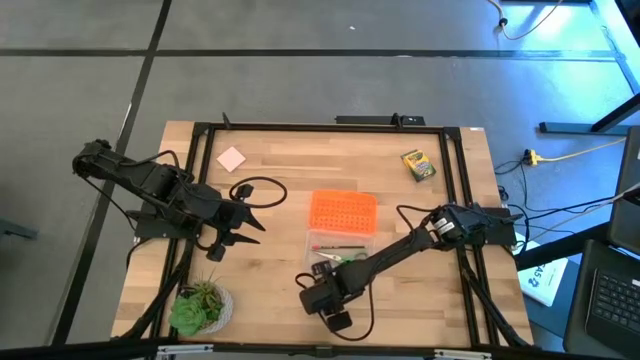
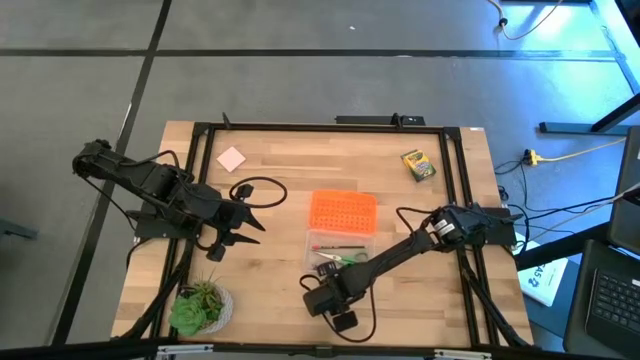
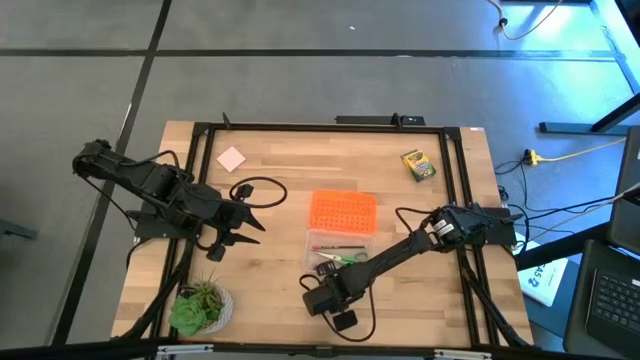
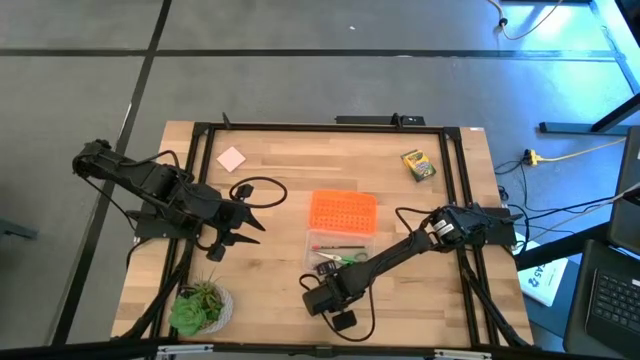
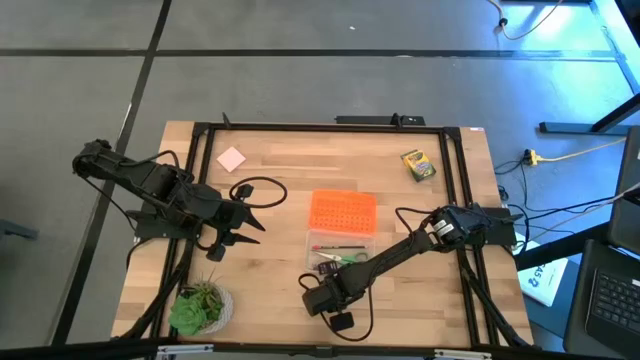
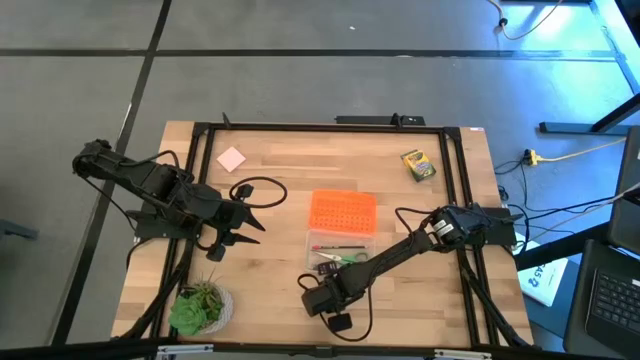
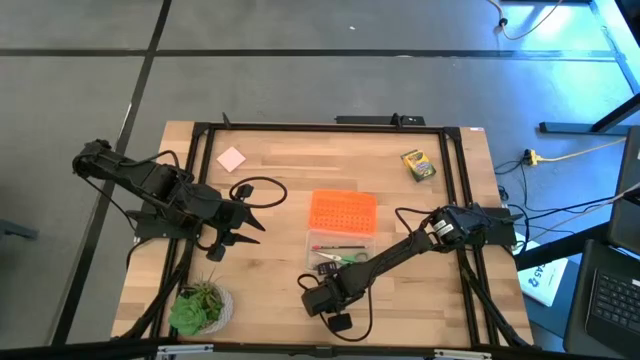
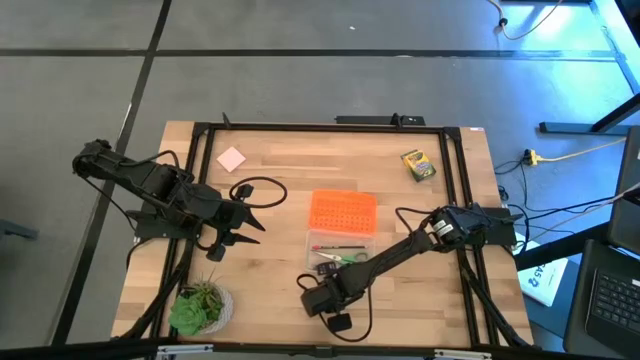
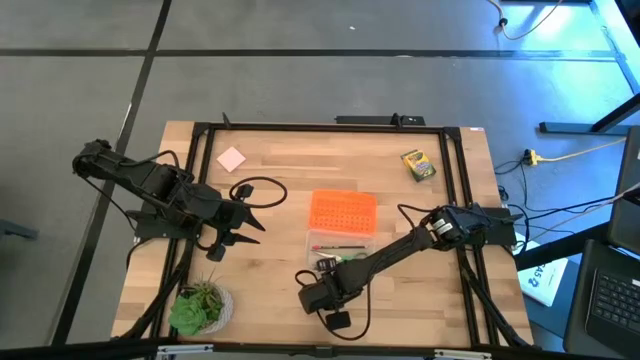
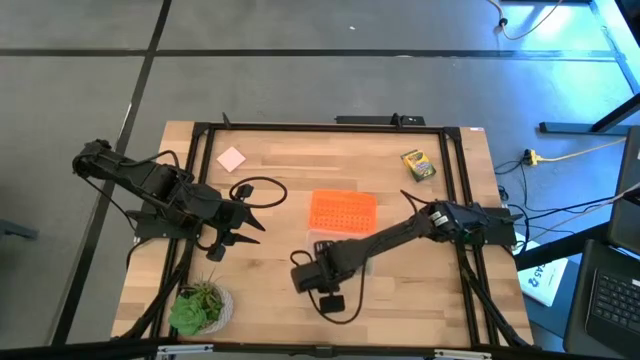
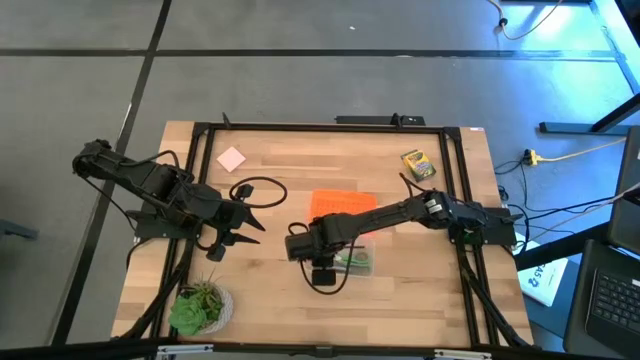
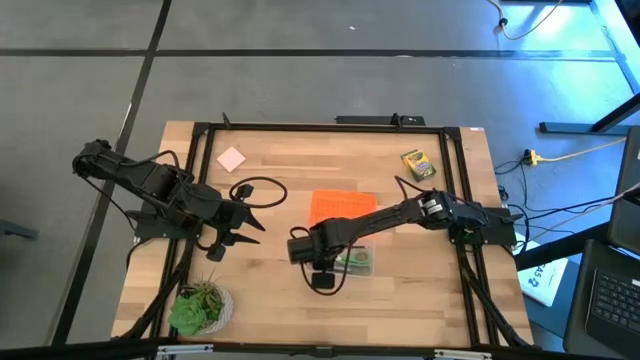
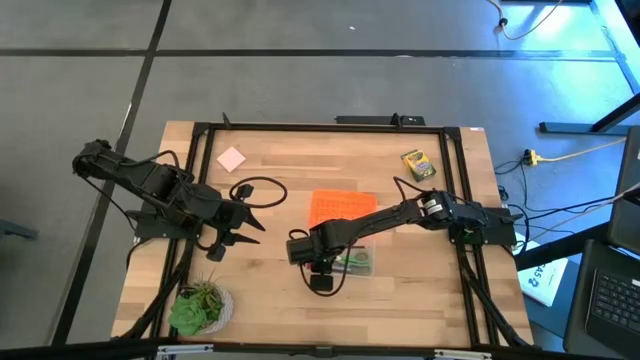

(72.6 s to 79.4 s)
Task: Pack school essentials
Put the red eraser into the orange supply box

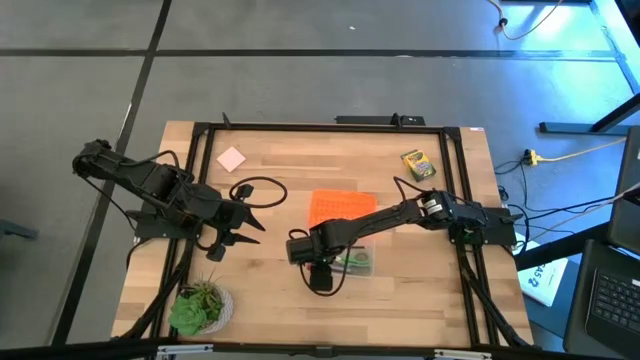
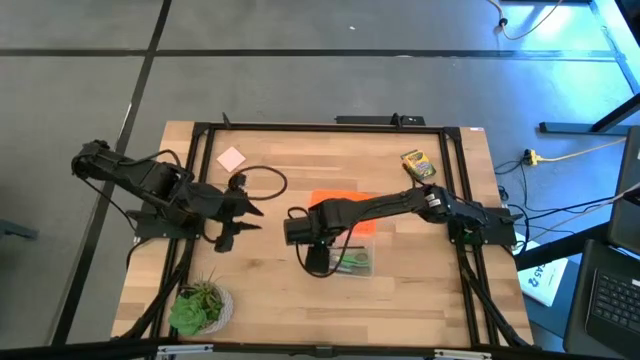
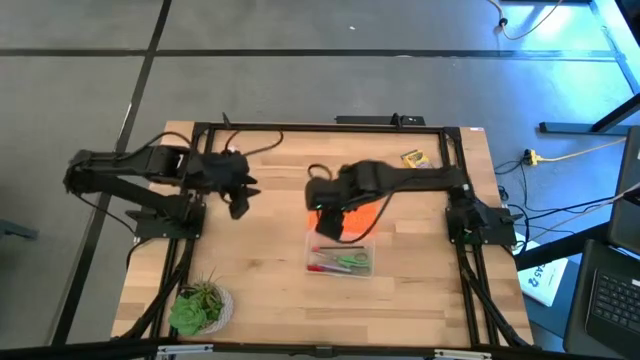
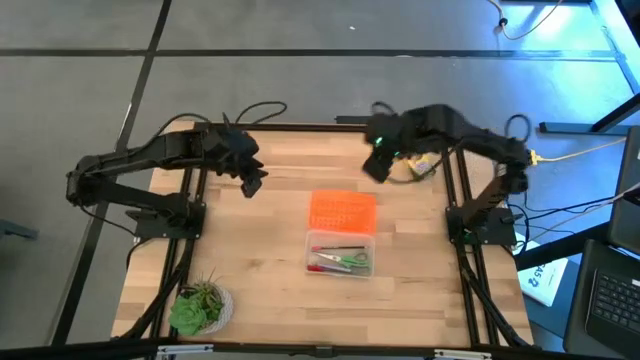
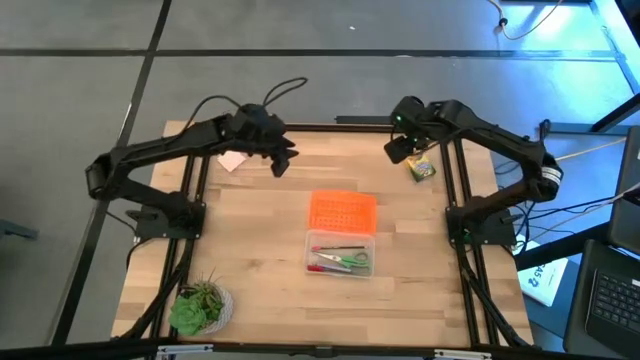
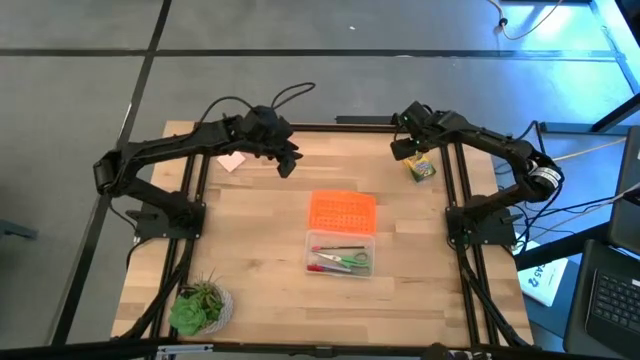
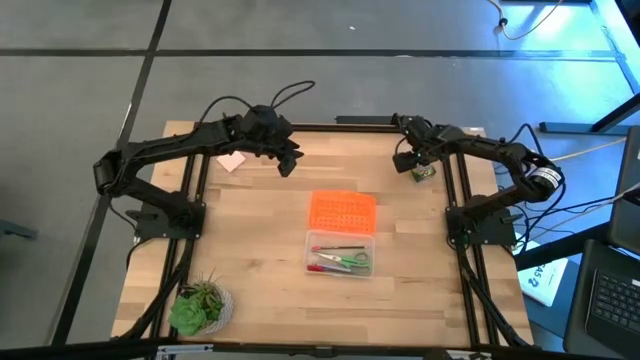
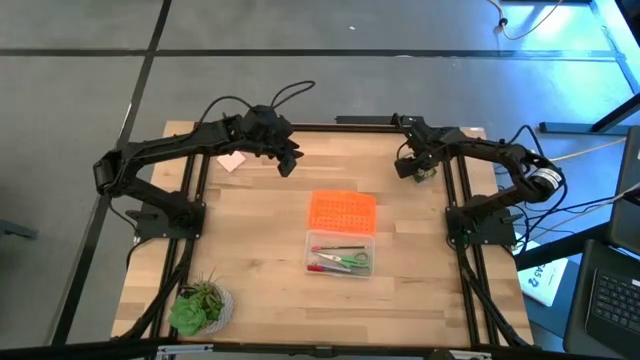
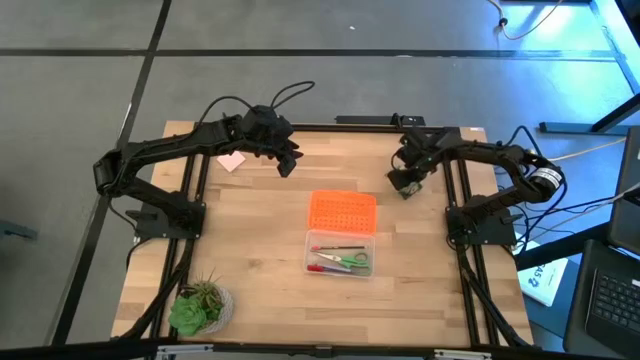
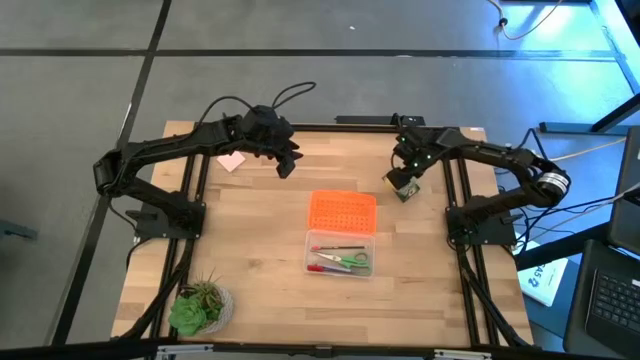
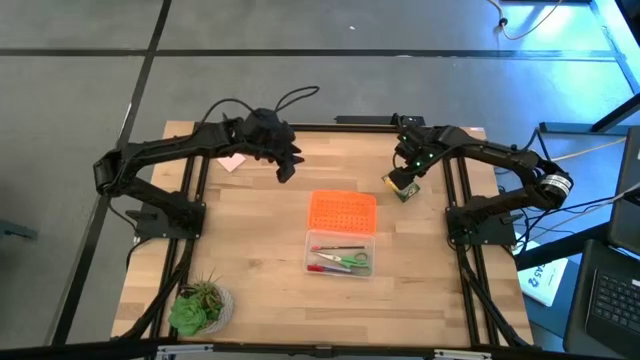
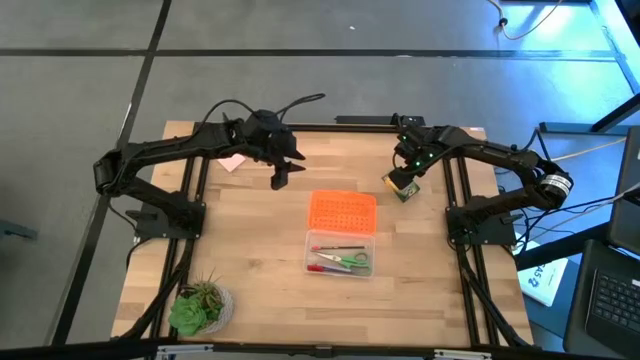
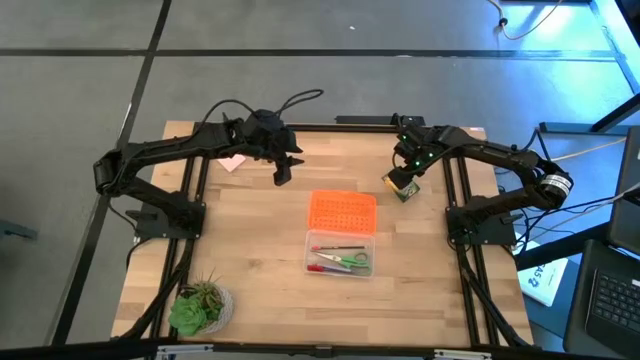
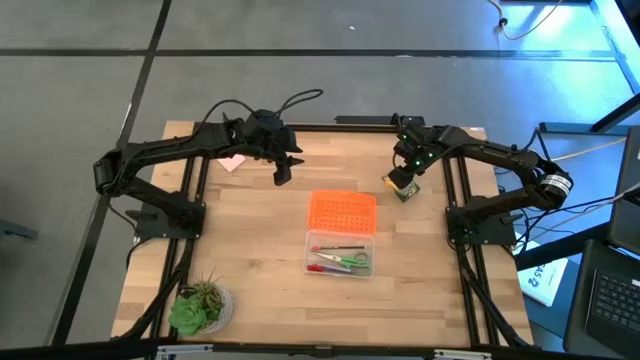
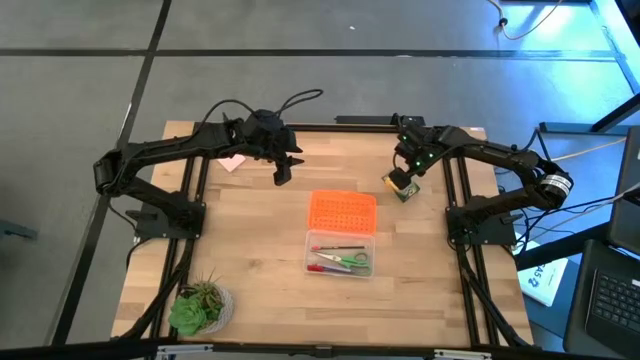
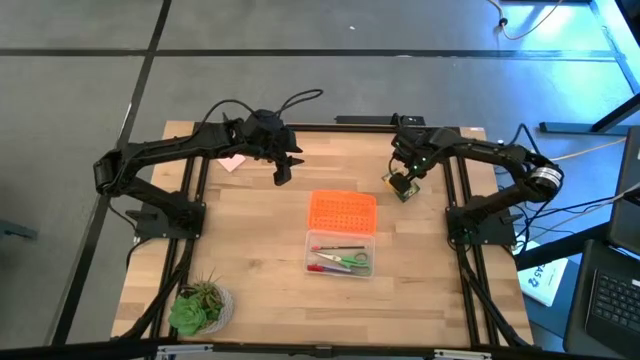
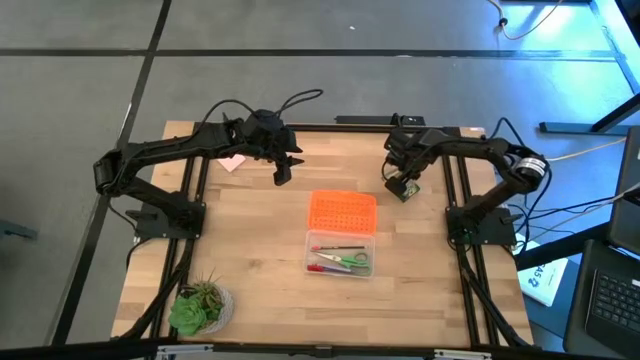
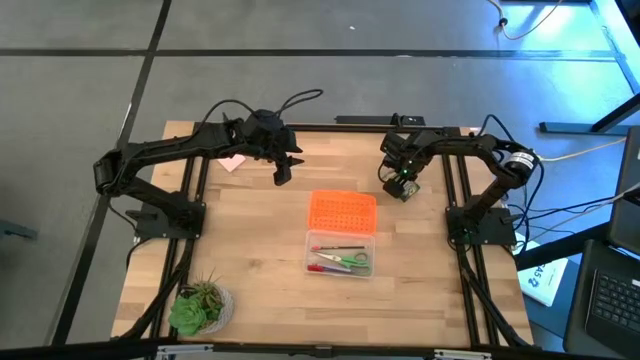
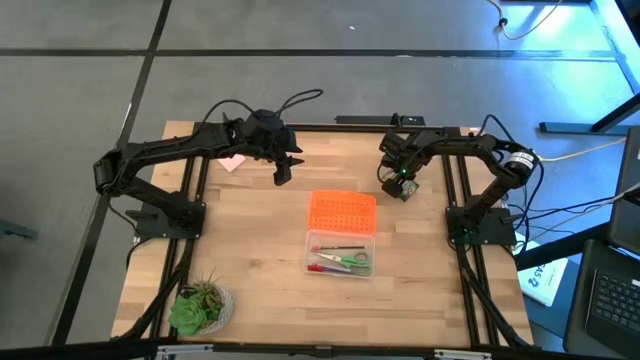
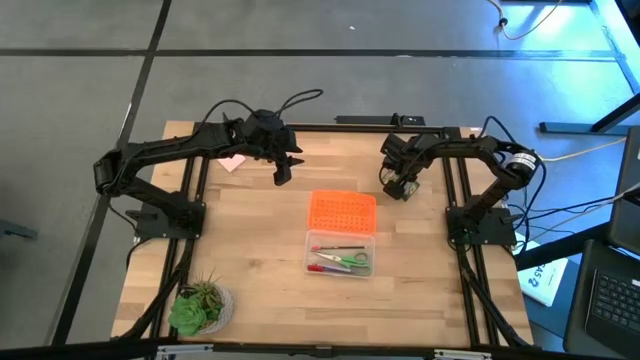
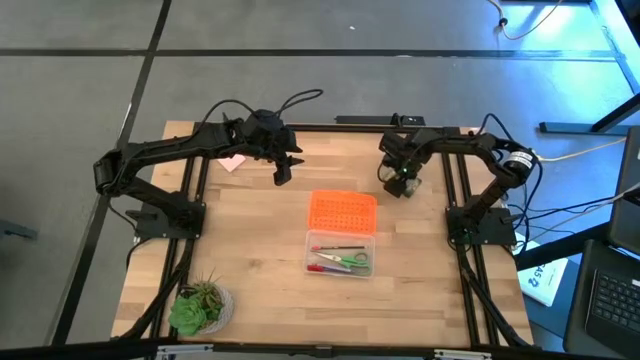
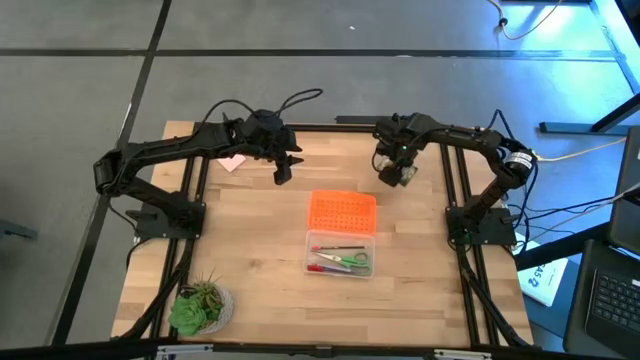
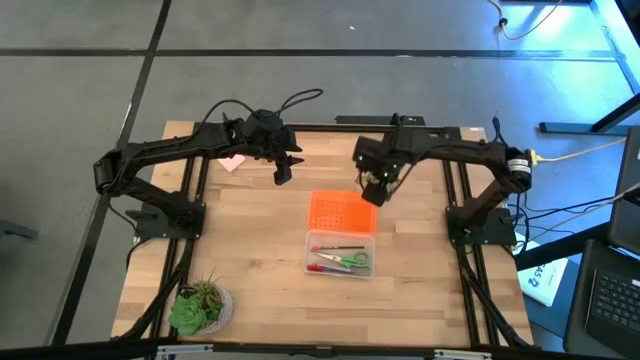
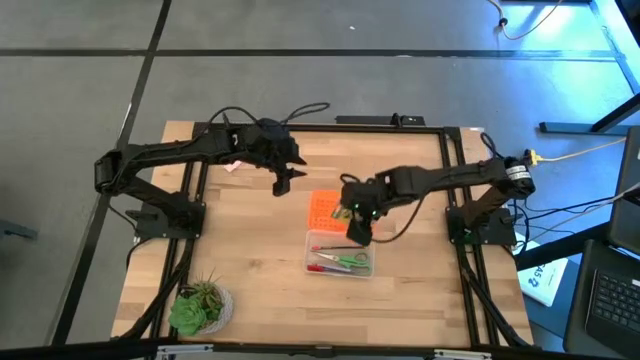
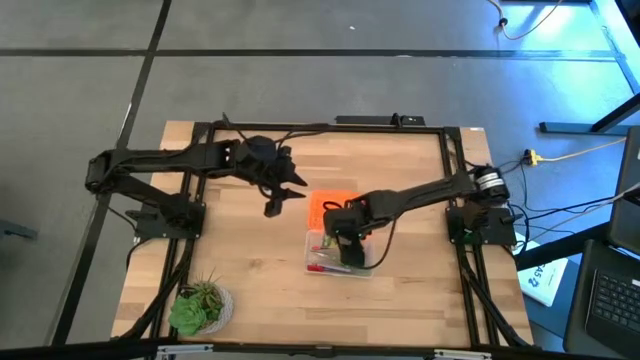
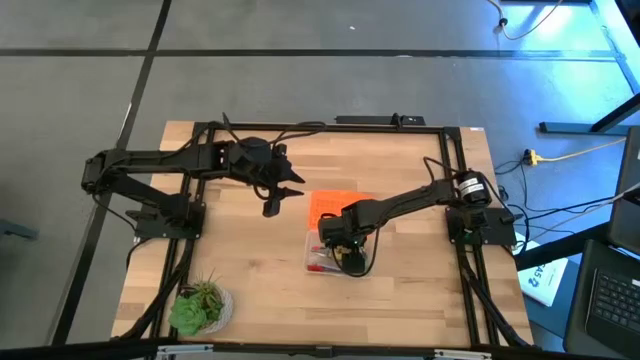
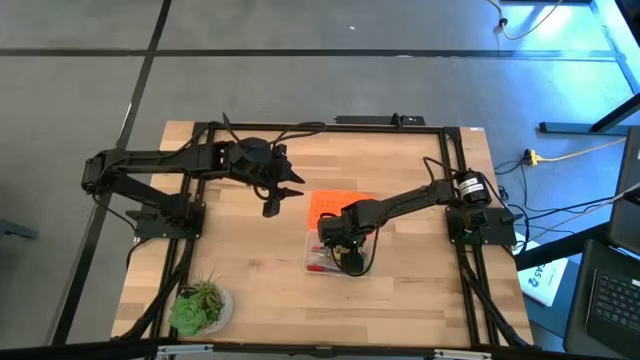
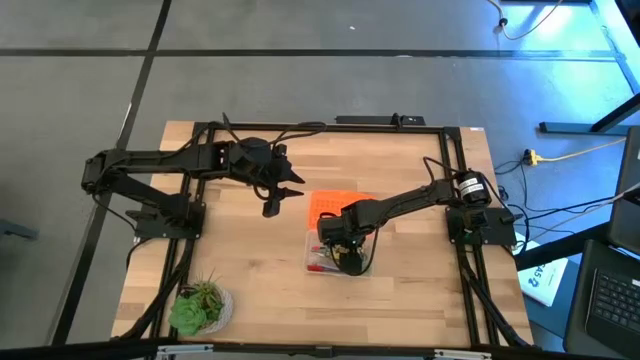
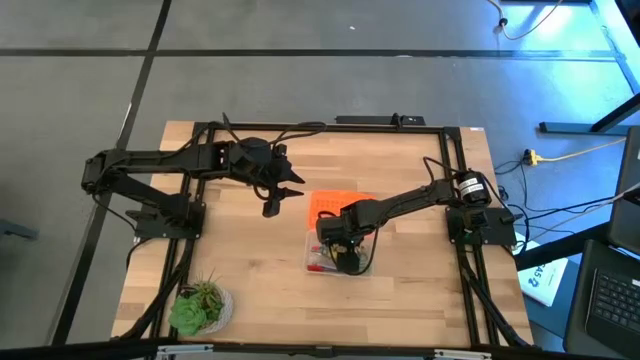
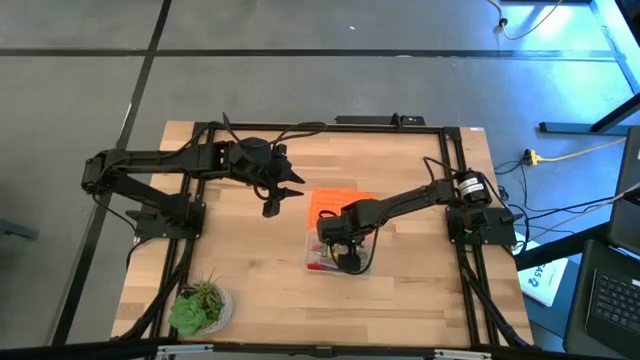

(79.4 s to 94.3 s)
Put the crayon box into the orange supply box

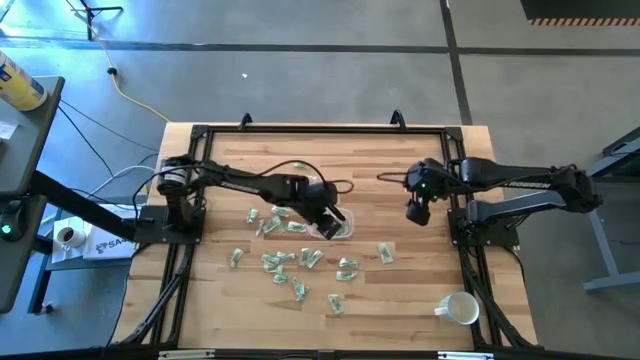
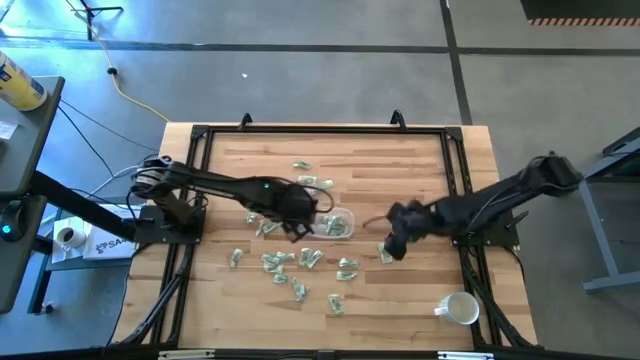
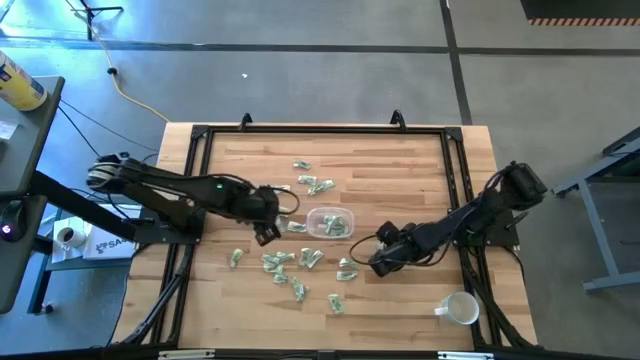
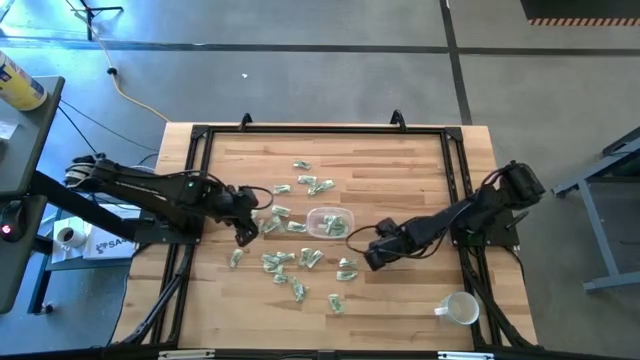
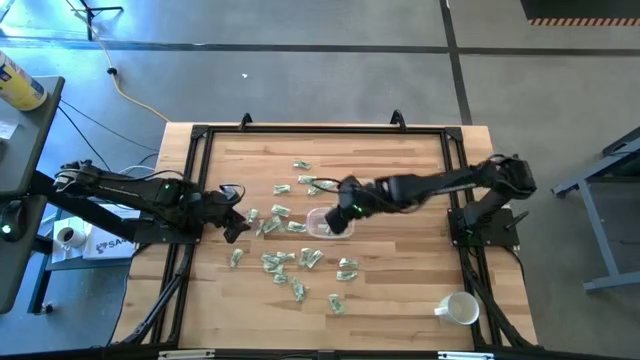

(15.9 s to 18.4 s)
Task: Pick and place Stevia / Truvia into bins
Put the stevia packet into the transparent container
